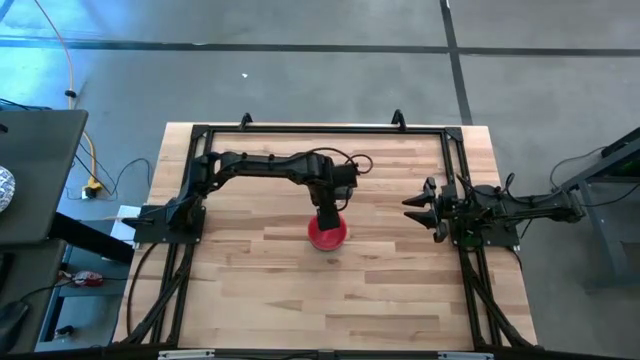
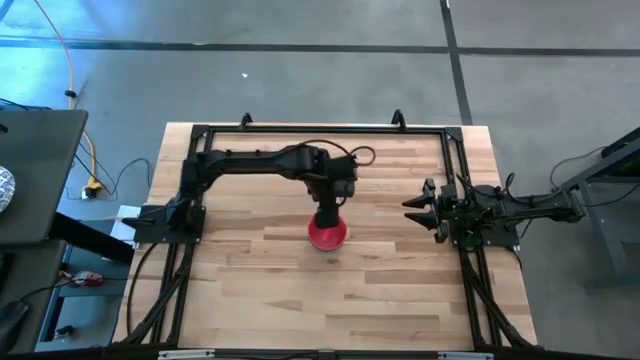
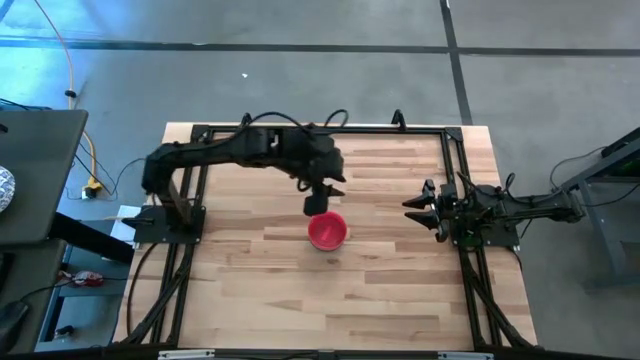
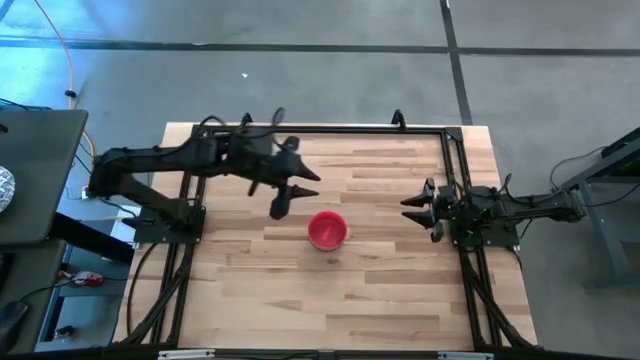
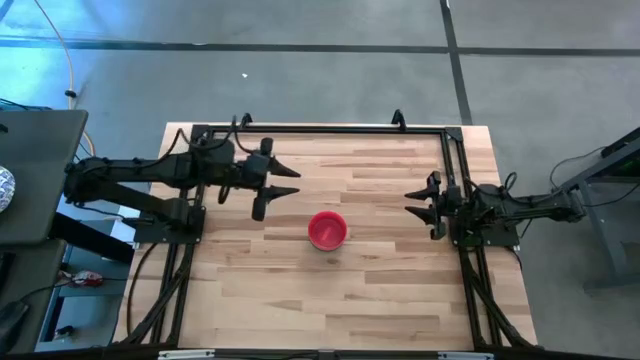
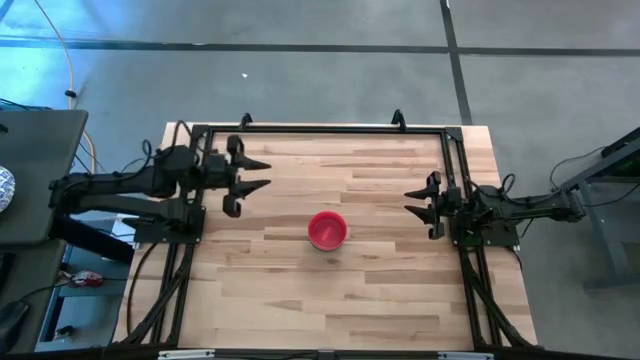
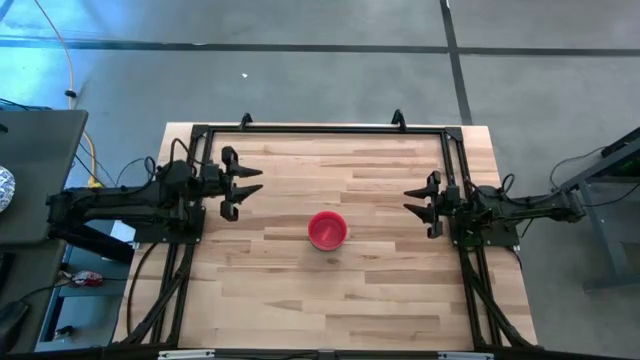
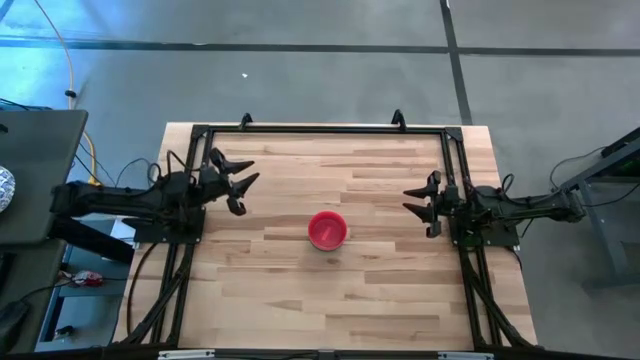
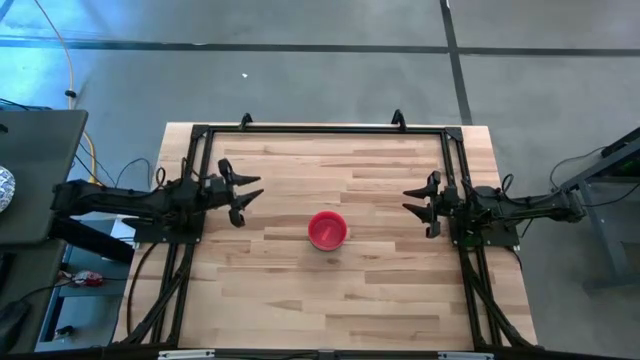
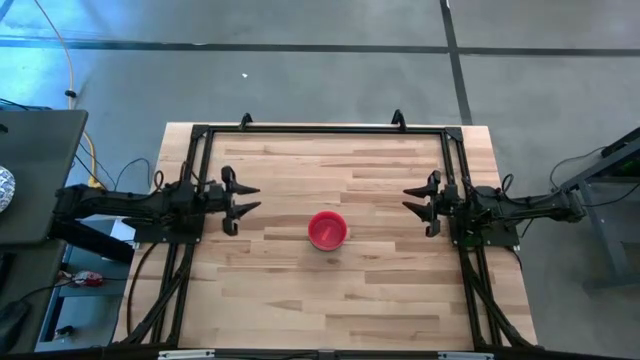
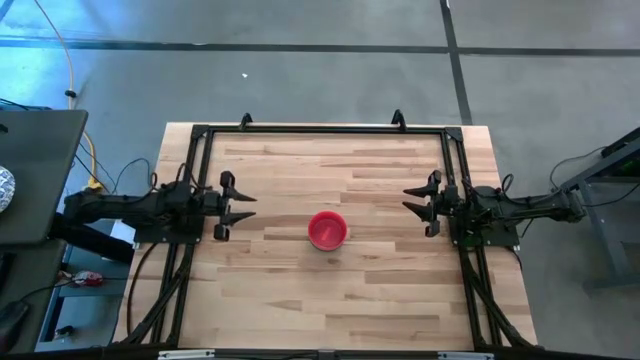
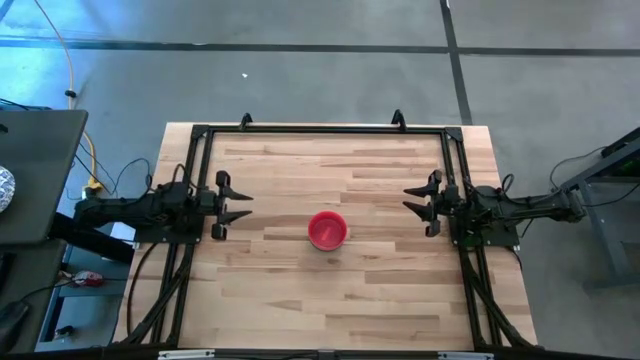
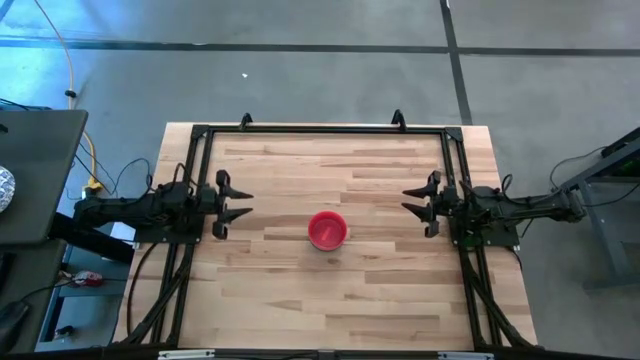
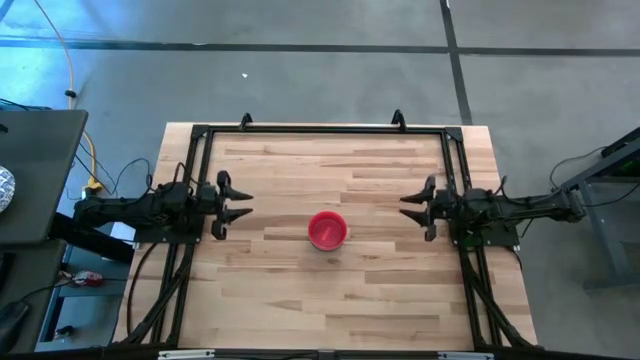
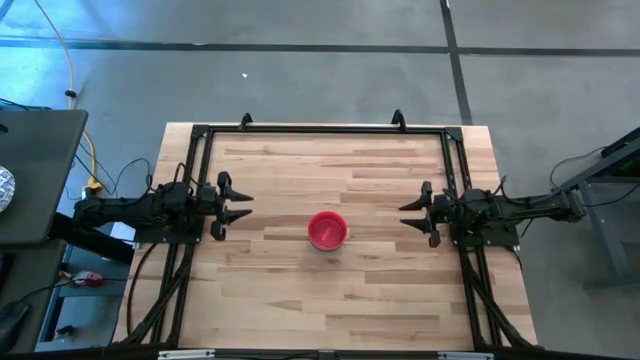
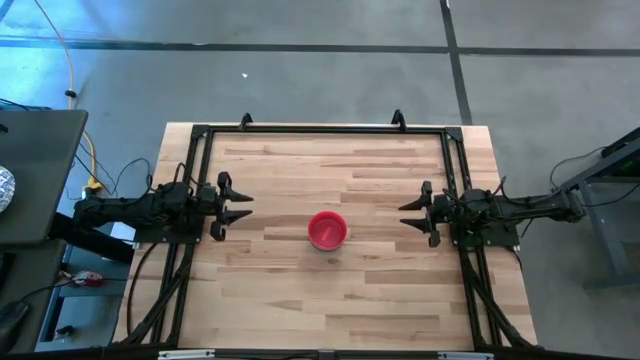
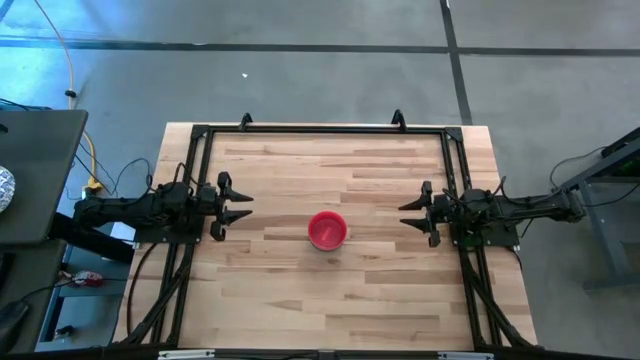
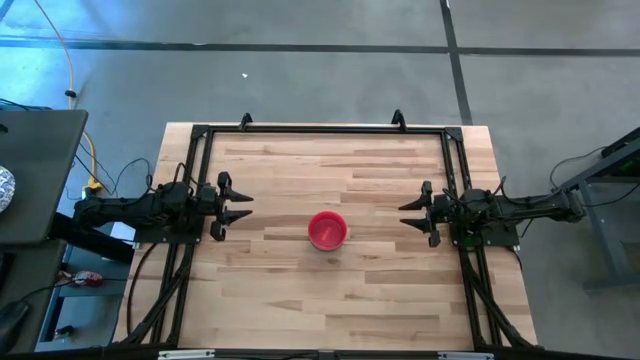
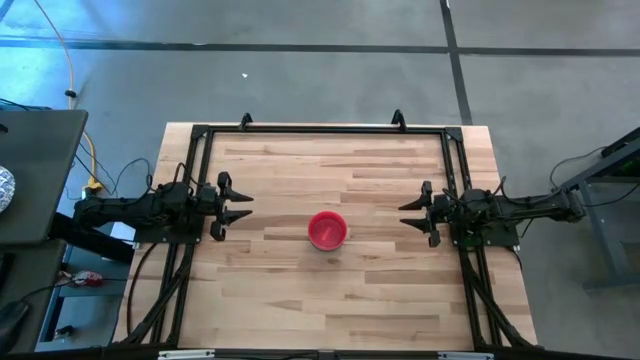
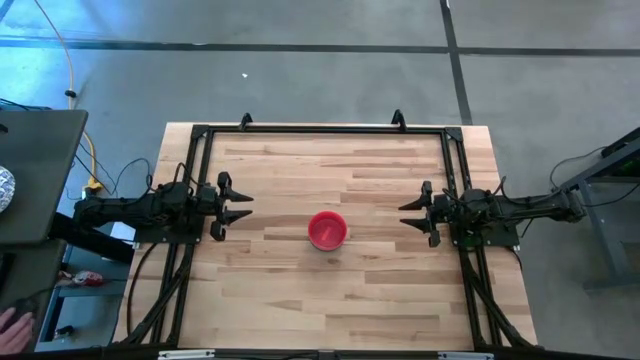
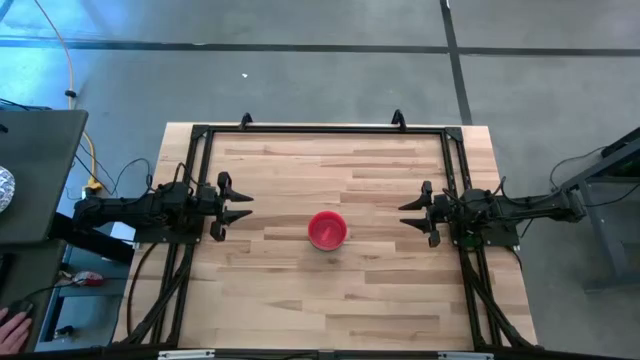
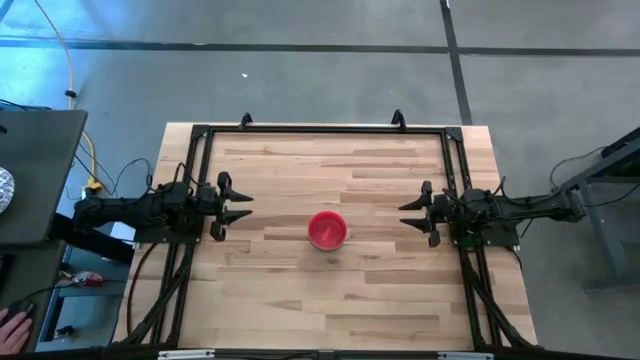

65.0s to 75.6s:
Task: Nest bowls inside each other
Return to Home Position

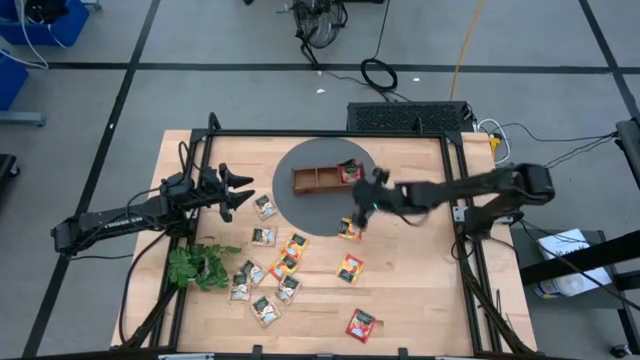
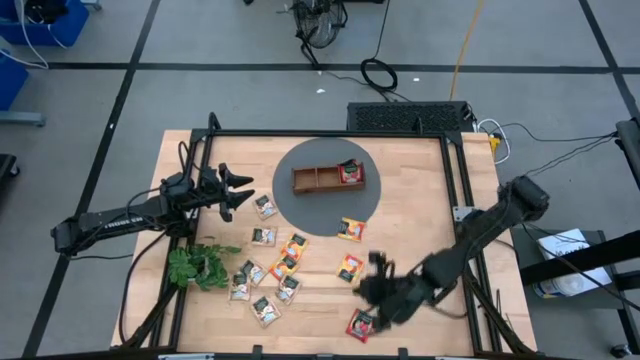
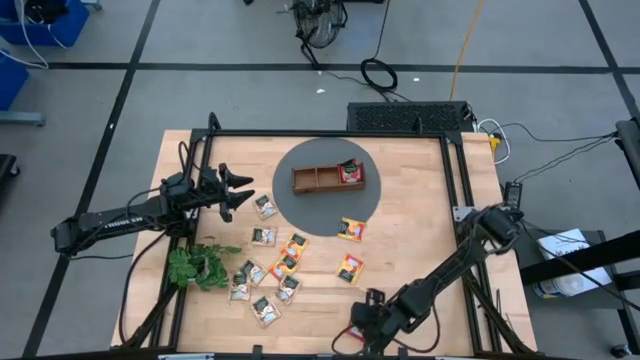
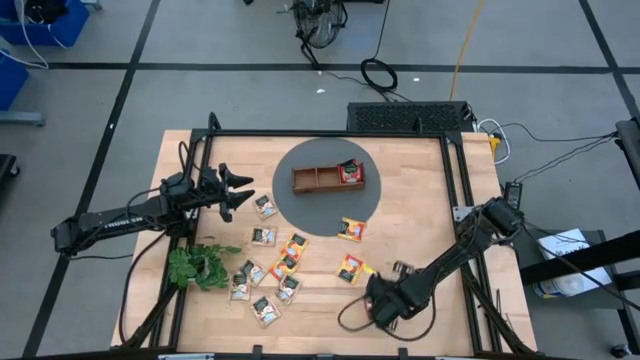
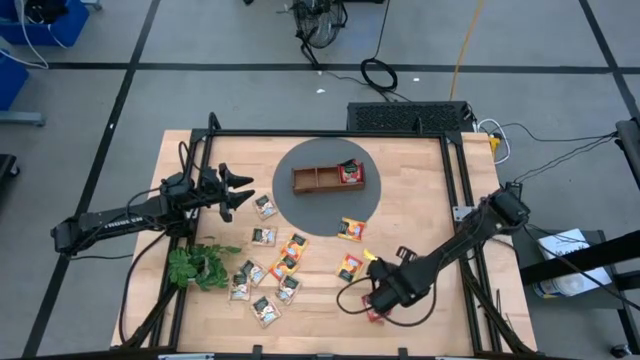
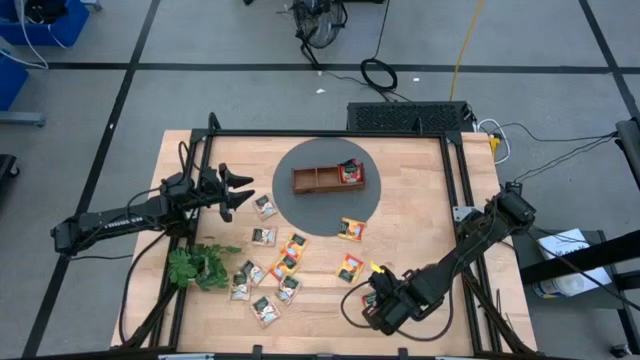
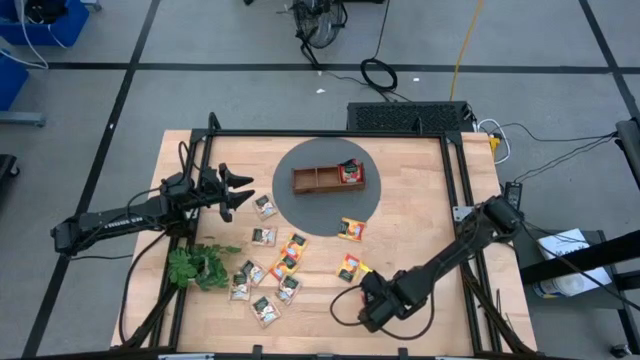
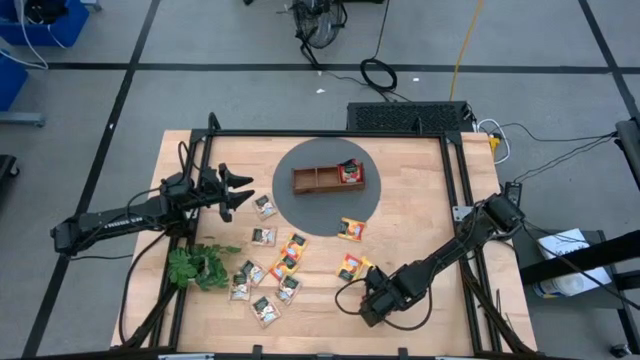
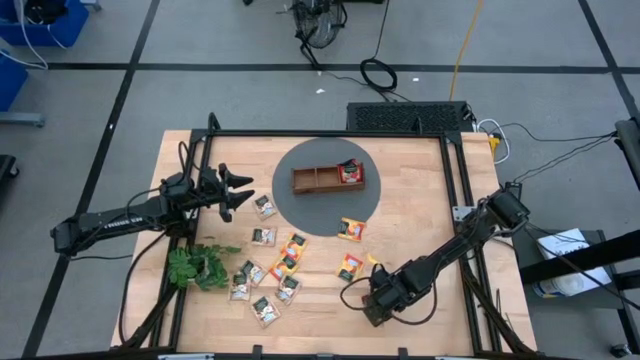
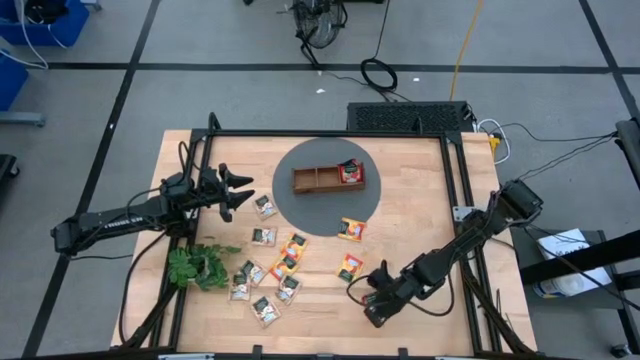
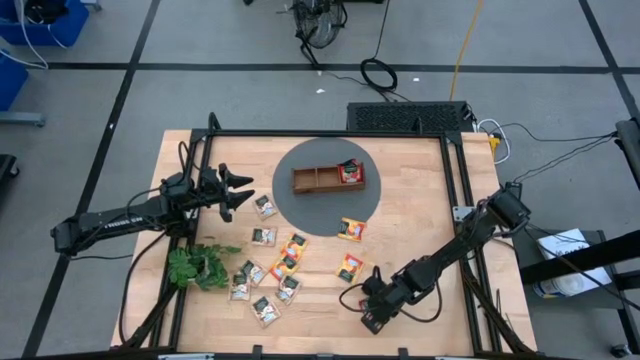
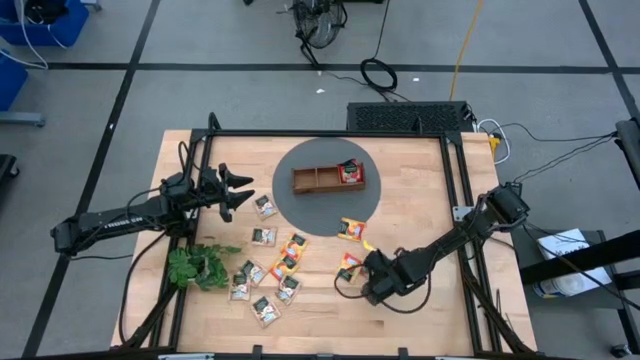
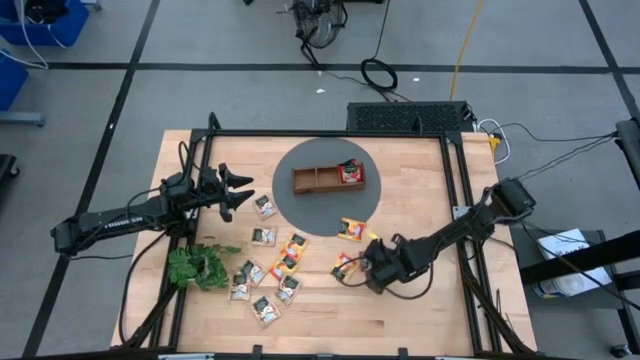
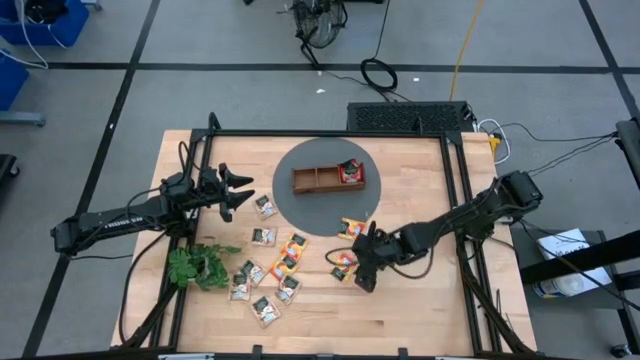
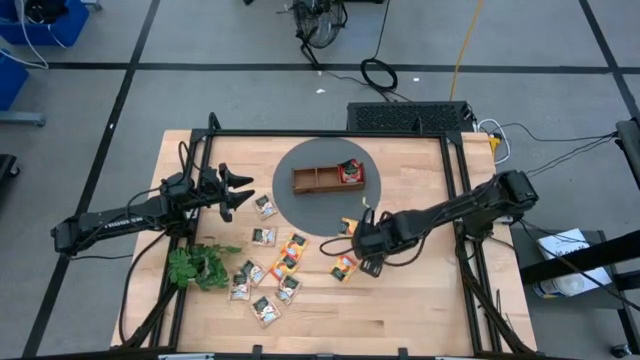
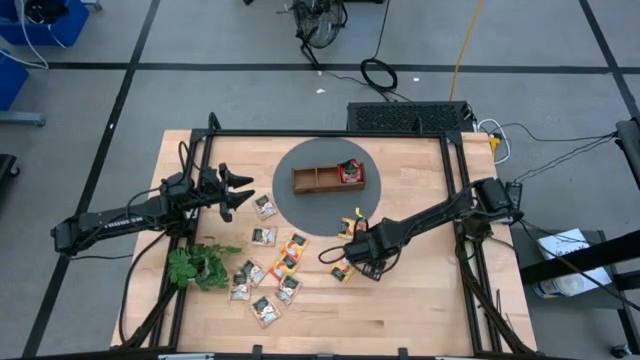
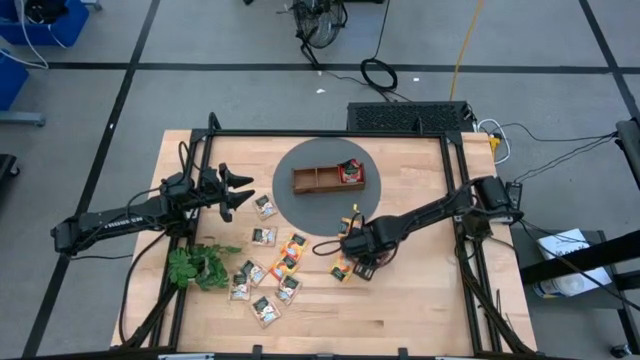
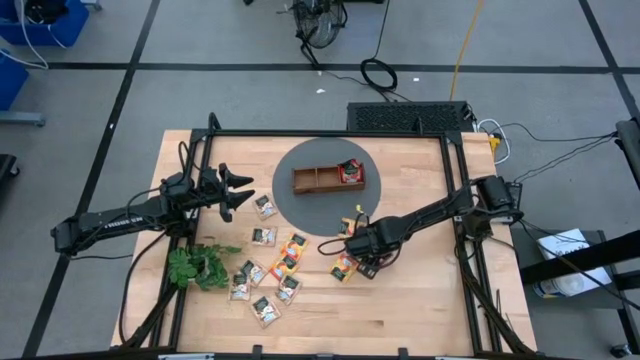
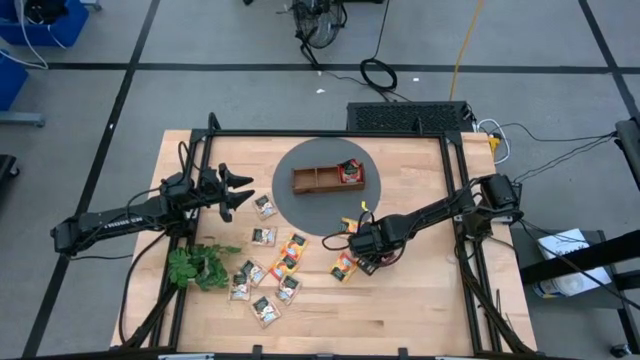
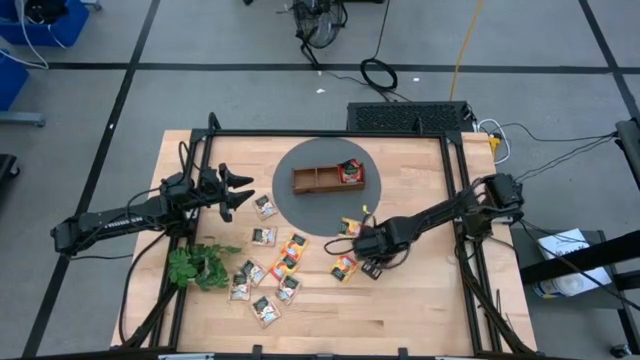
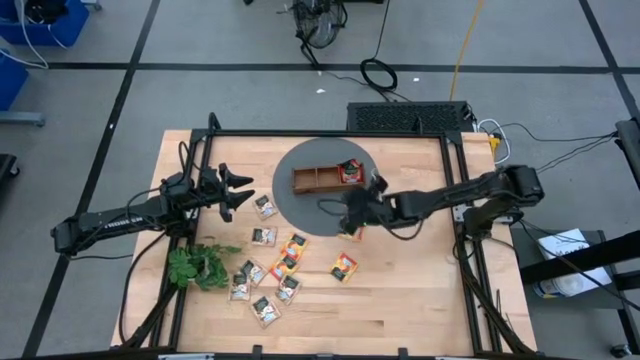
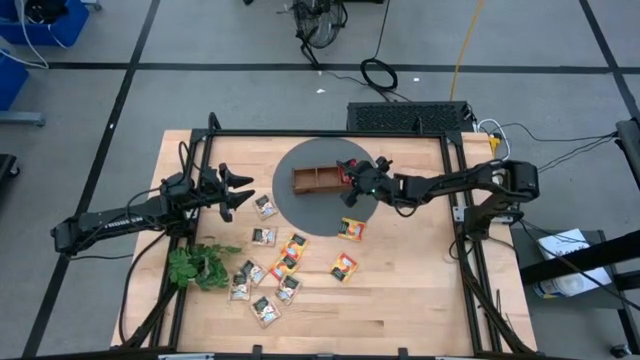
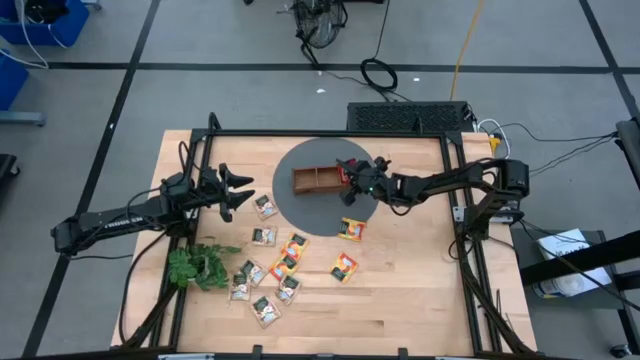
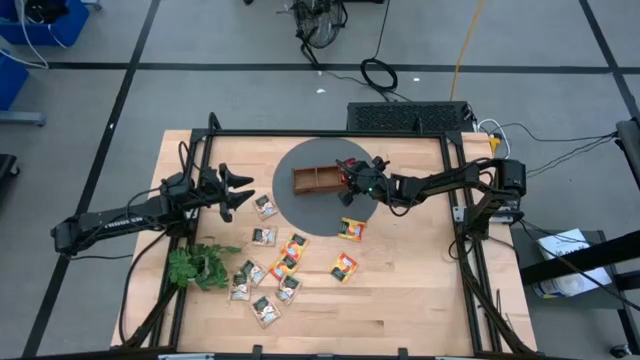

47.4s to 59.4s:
Task: Pick & Place Tea
Put the red tea bag into the right section of the wooden organizer
